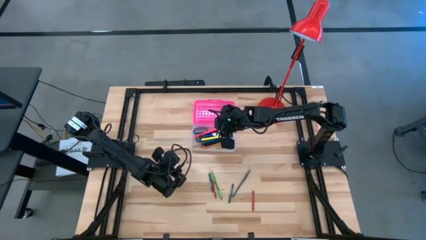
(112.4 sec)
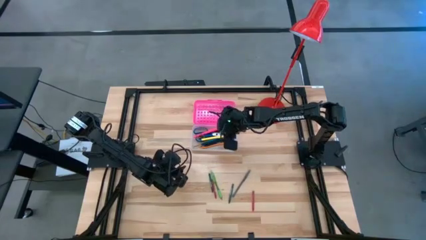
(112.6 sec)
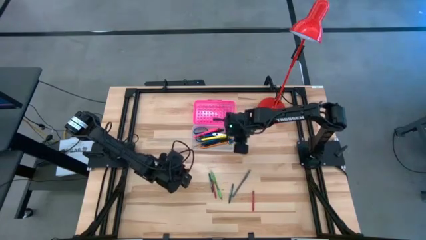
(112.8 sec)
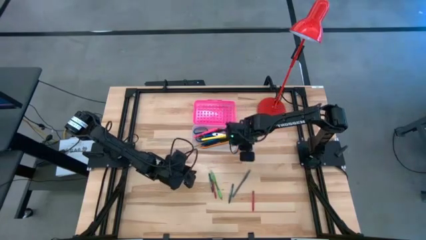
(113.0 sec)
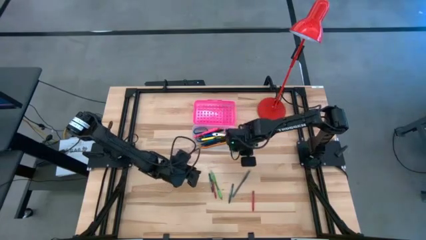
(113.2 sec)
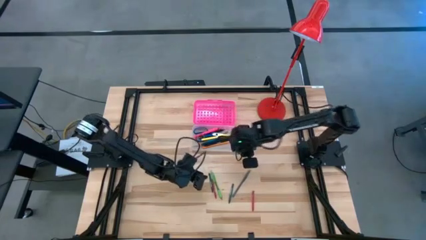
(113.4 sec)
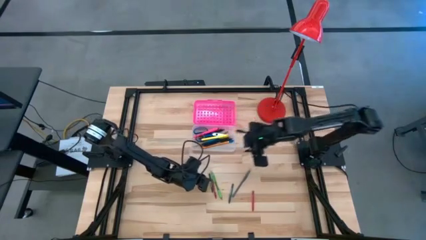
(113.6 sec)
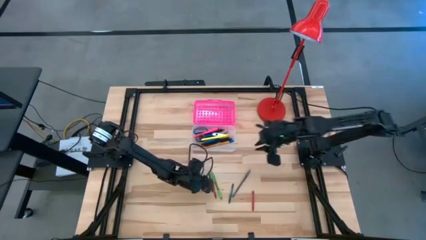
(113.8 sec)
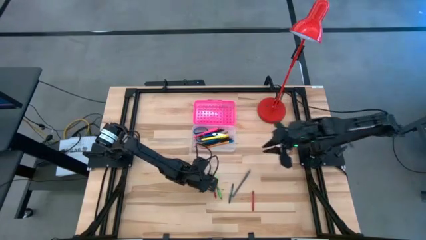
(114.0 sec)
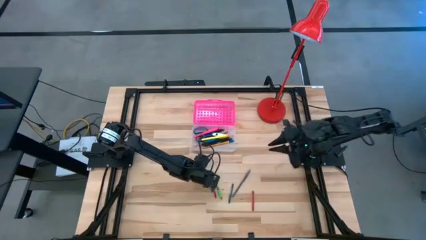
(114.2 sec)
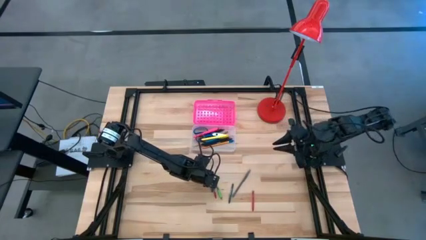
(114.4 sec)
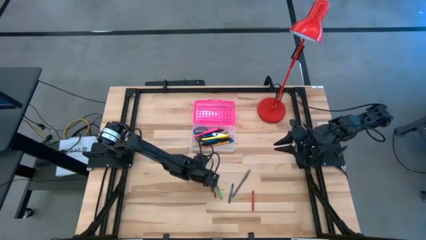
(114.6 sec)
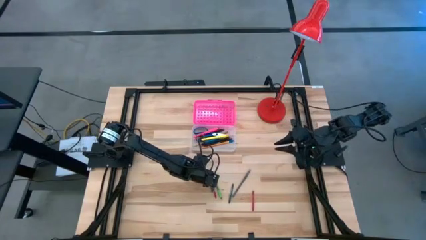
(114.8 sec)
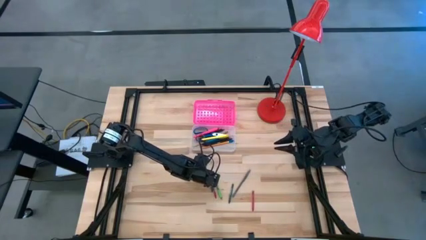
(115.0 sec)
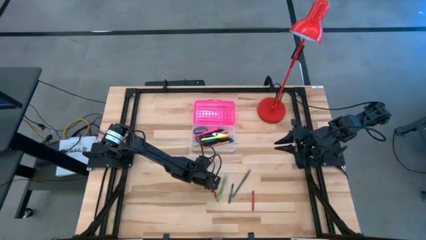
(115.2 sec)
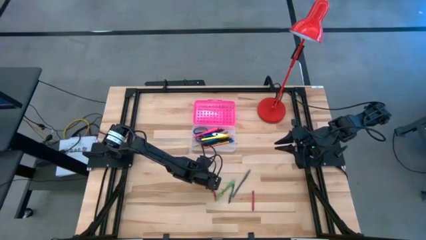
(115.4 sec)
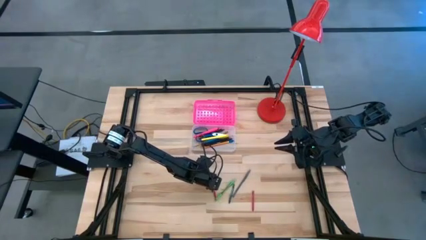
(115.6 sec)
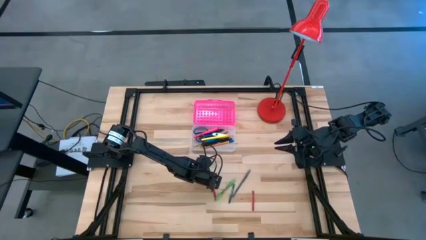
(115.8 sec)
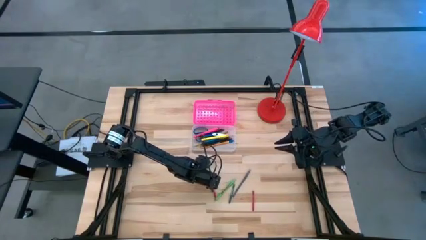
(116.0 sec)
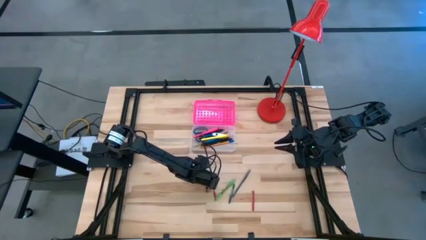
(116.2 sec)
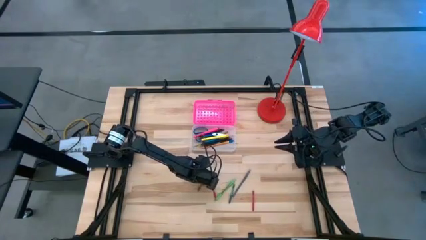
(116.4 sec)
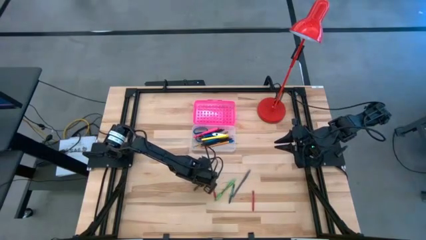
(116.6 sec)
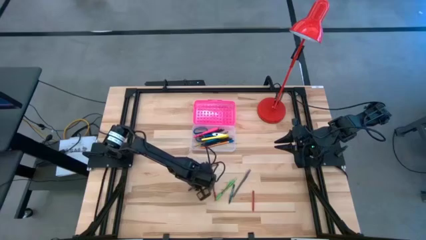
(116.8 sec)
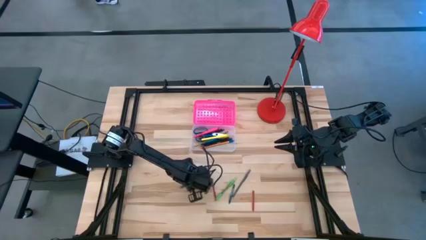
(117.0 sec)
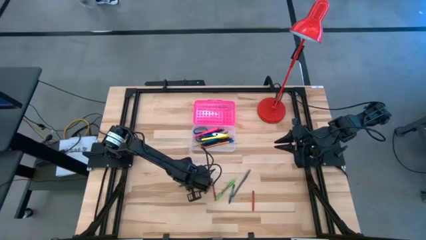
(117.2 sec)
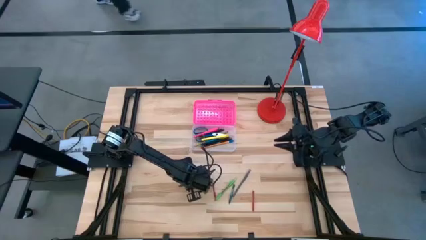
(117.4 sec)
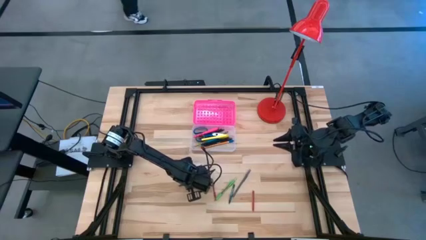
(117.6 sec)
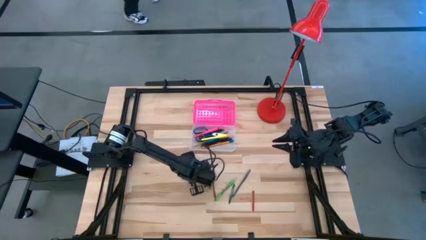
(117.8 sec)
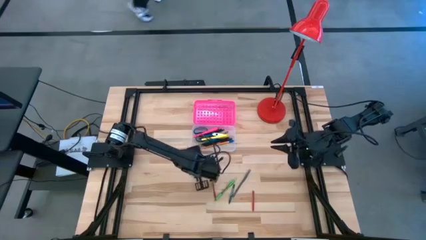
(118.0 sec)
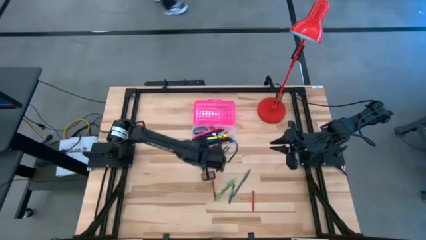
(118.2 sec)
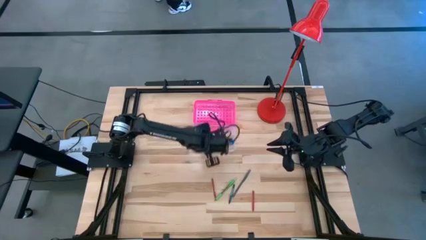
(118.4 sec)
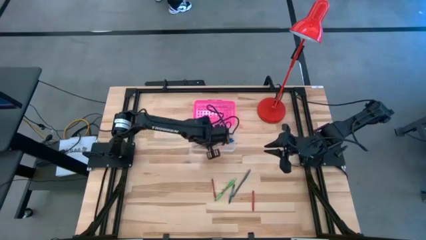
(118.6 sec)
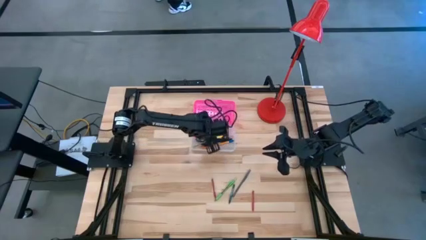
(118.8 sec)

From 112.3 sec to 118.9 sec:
Task: Pick & place school supplies into a supply box
Put the green crayon into the pink supply box

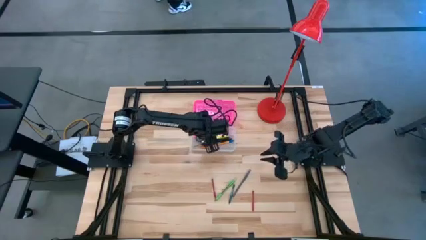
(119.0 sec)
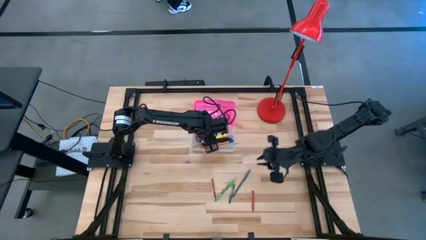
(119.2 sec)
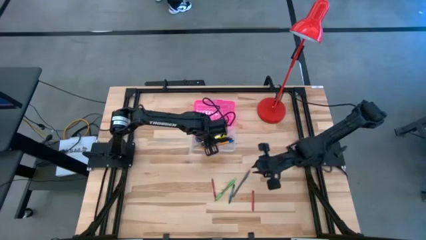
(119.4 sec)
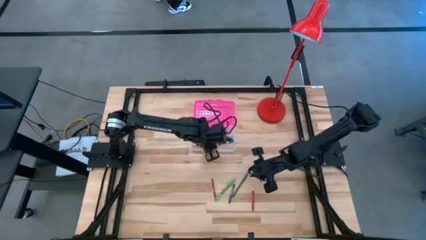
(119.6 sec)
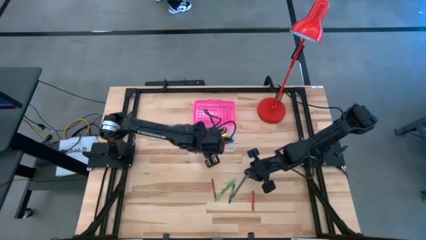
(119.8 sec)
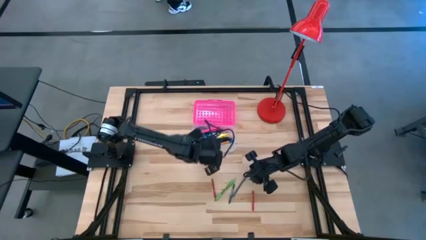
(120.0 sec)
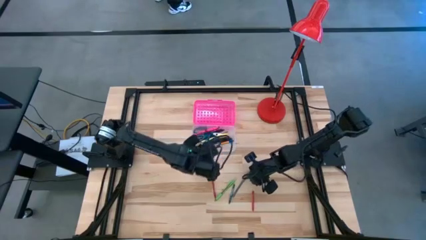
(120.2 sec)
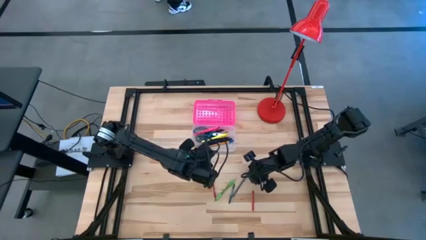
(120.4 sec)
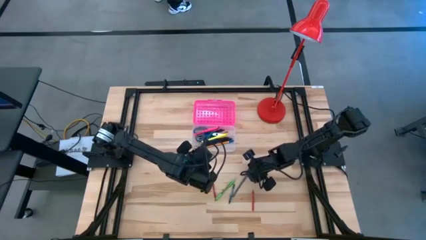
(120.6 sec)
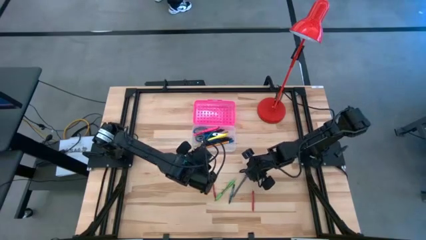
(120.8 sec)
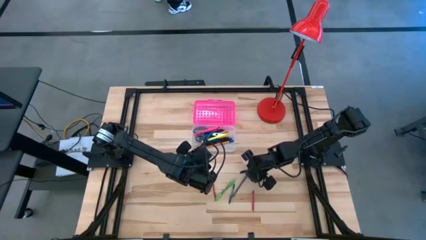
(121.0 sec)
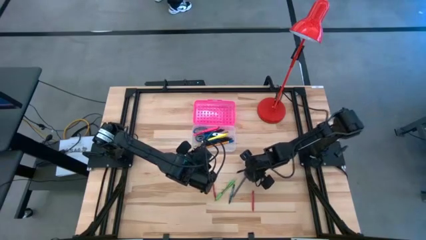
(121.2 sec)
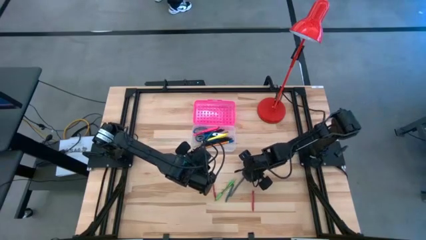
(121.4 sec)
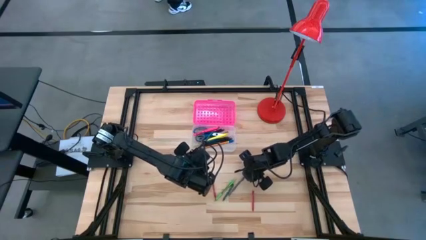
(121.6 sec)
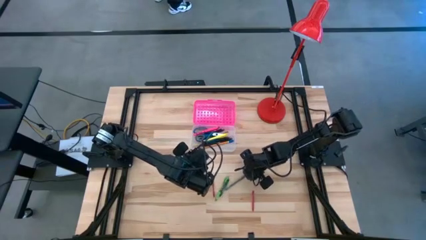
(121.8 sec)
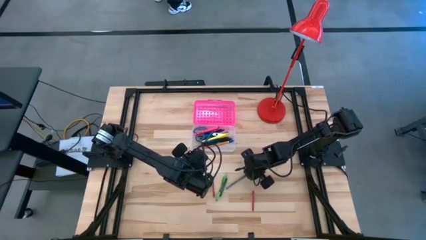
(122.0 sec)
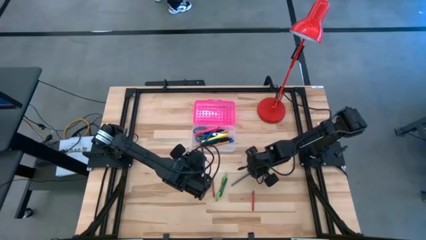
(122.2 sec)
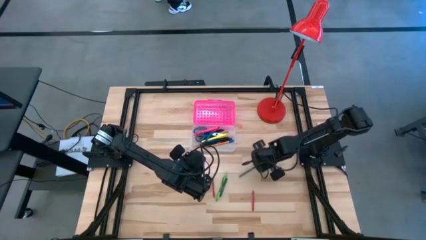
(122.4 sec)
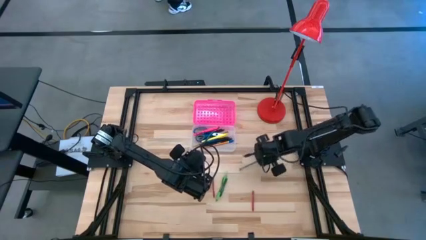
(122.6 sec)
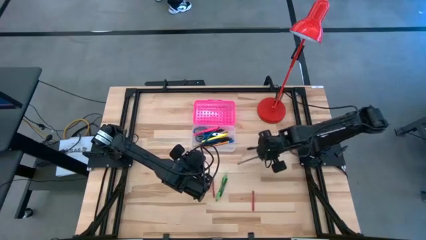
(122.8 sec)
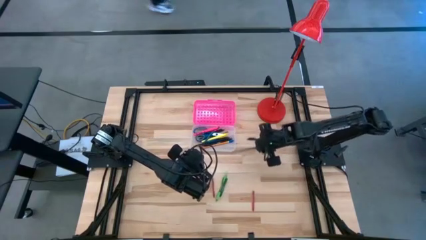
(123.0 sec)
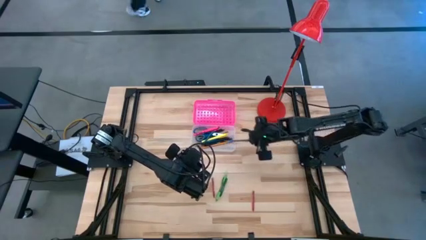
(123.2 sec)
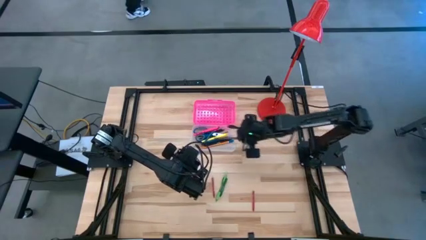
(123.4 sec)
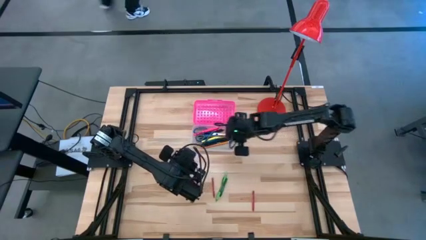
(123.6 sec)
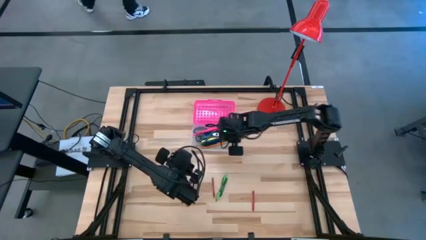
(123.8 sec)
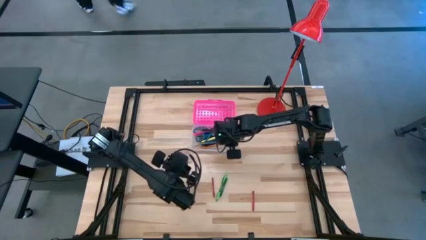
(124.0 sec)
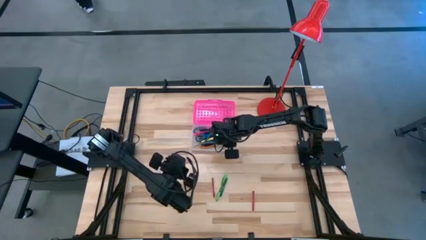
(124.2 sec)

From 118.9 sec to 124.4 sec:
Put the gray pen into the pink supply box
